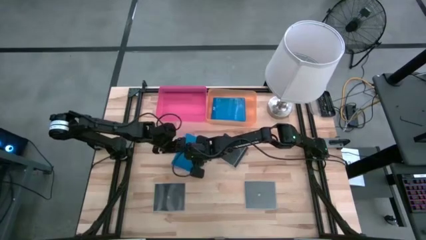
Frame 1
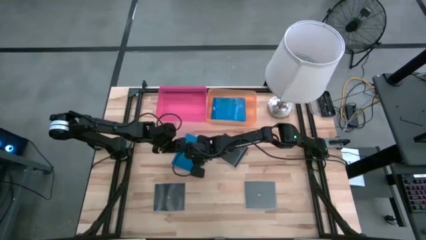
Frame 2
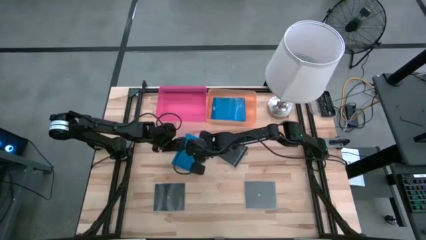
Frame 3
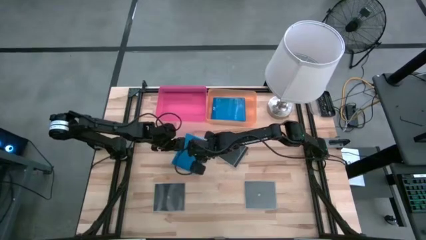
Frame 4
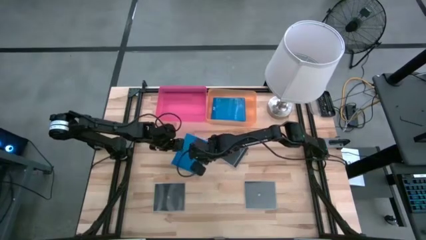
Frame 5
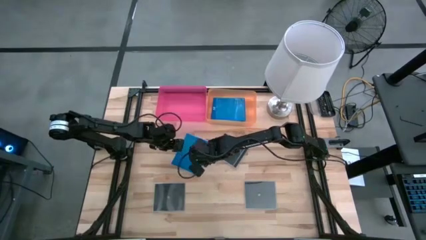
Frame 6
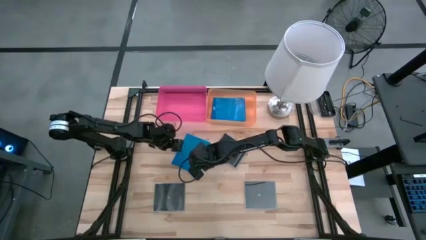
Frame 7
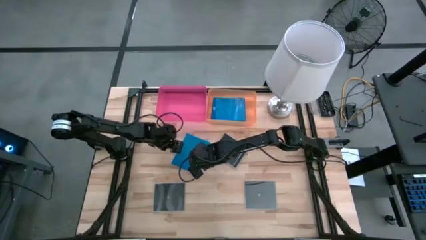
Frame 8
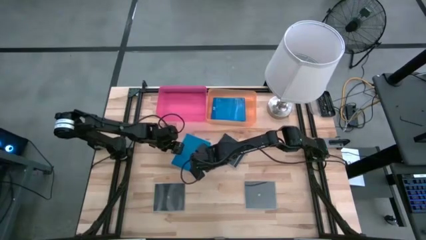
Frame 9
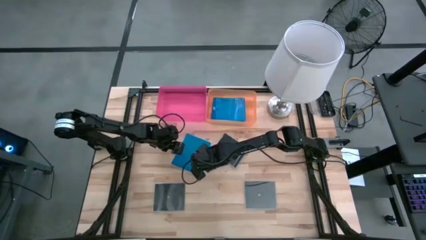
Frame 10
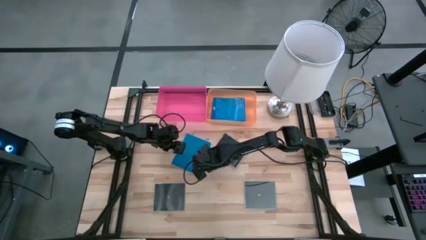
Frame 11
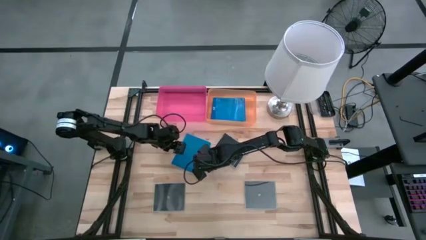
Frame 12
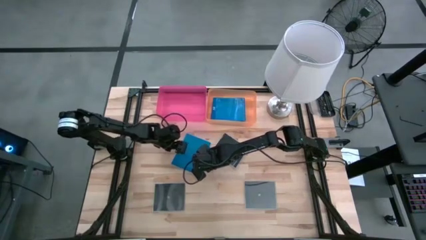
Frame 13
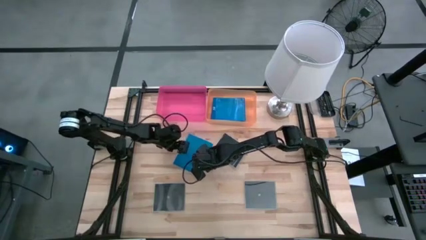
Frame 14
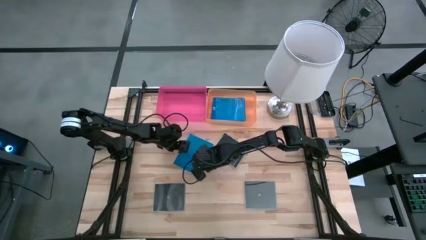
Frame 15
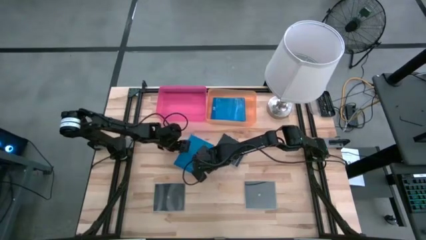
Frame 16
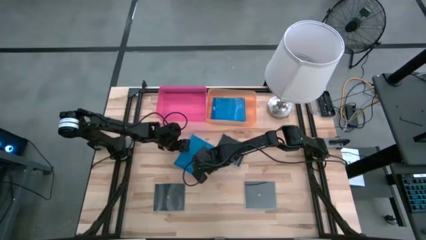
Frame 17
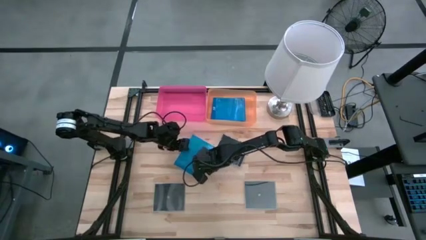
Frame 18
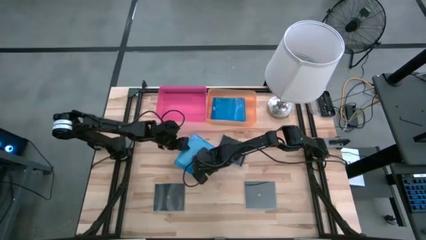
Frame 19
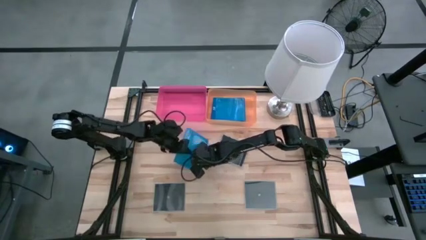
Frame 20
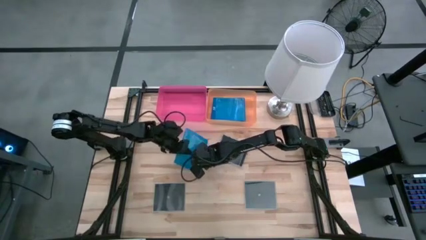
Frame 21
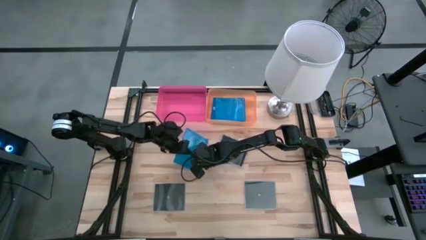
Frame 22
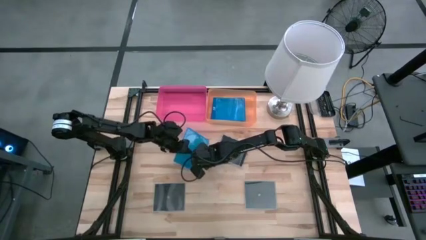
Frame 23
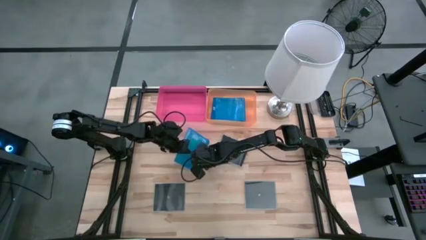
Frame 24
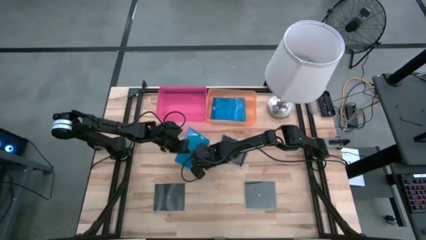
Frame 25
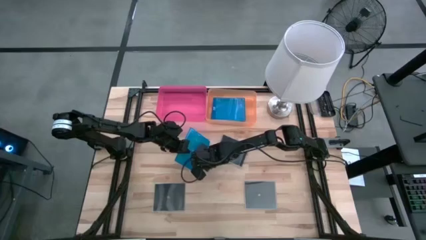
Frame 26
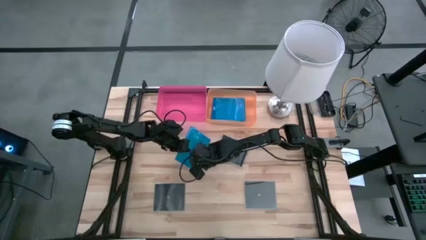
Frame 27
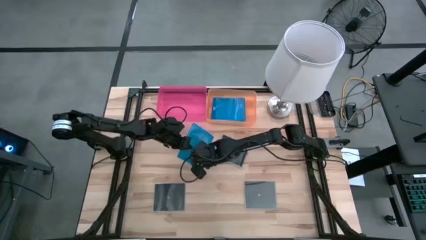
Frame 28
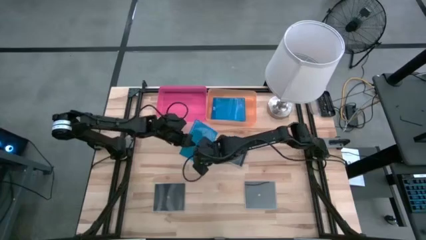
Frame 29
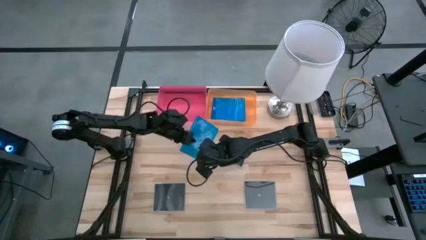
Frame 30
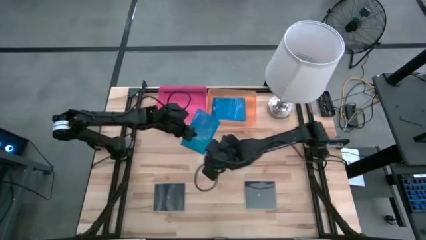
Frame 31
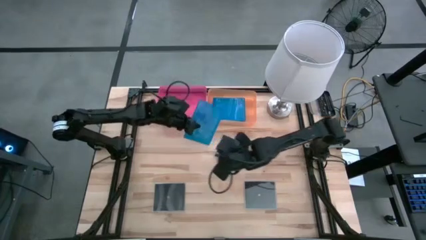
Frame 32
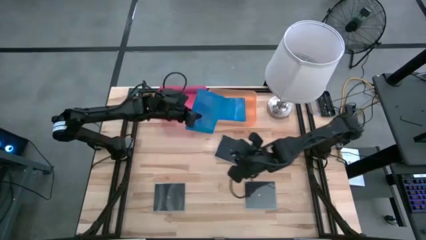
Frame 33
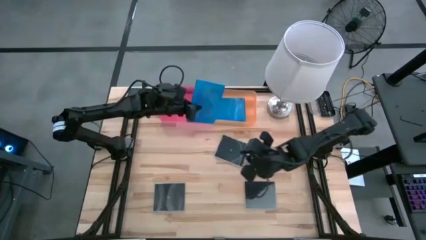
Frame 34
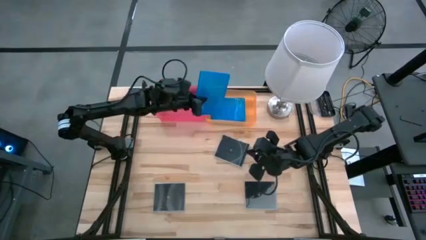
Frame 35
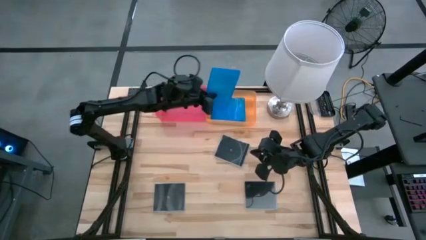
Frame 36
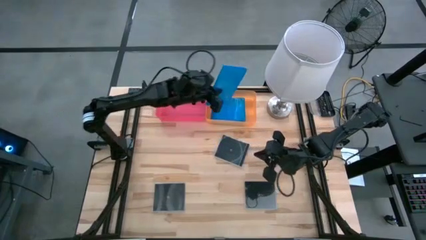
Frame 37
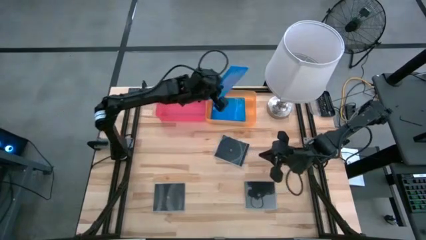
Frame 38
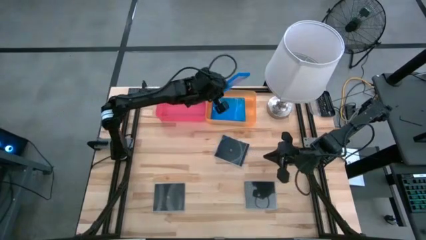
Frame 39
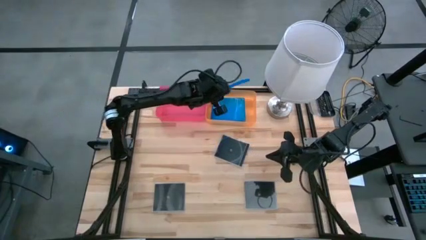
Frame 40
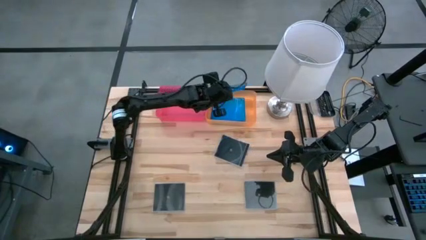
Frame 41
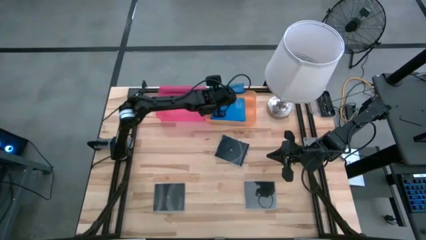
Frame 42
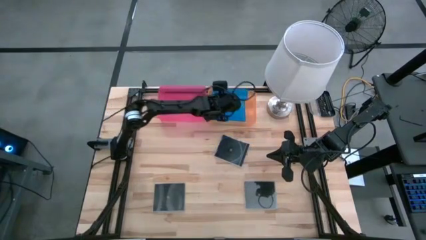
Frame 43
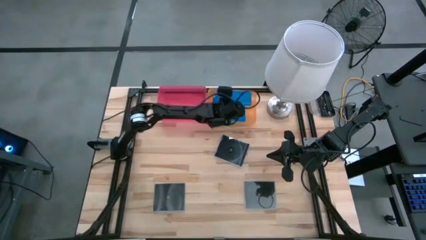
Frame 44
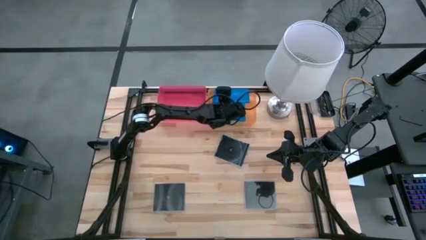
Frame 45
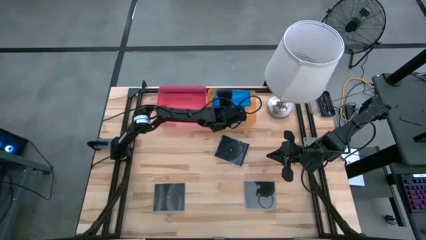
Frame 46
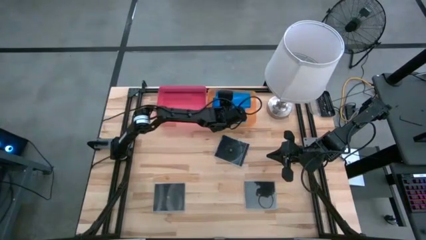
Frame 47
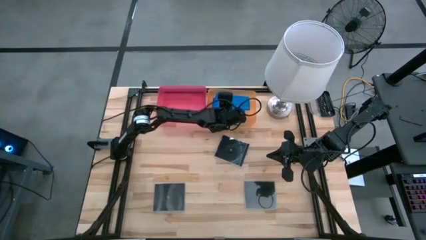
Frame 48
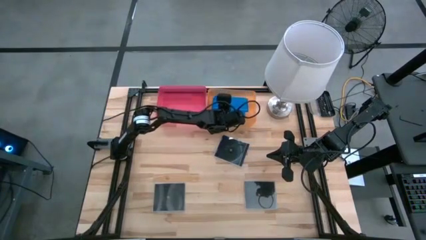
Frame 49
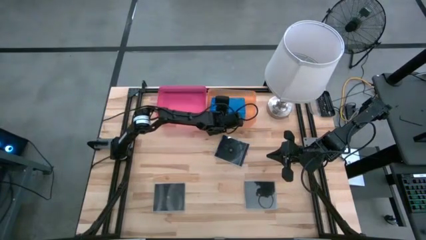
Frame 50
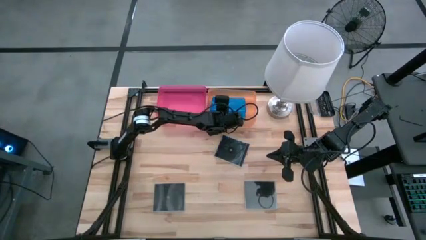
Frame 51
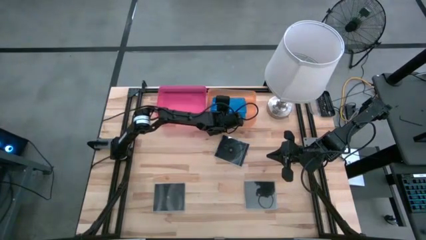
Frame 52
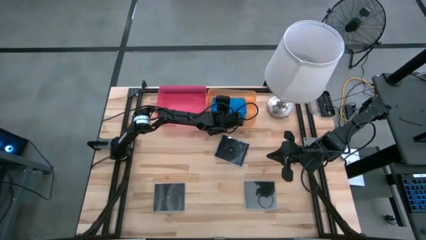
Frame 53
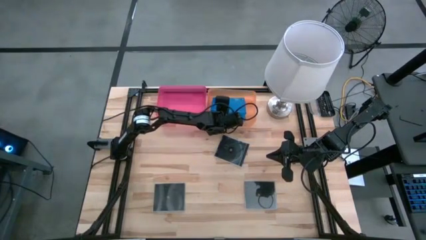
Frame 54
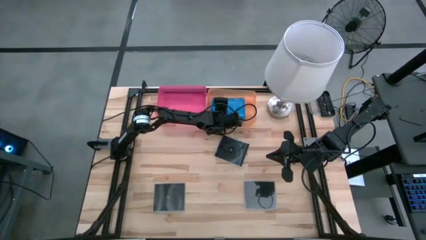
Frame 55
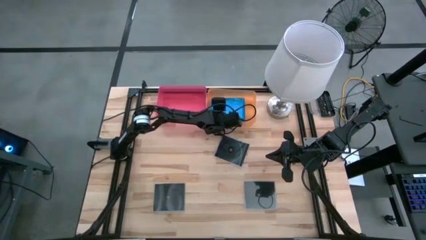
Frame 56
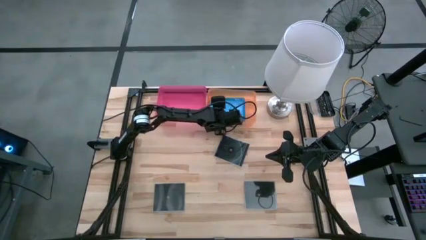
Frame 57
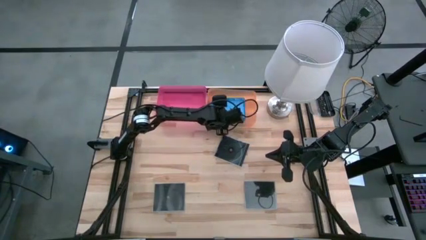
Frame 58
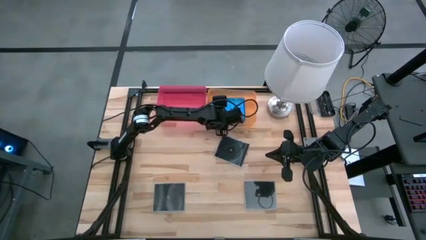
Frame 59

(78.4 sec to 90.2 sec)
Task: Pick & place jewel cases by type
Put the blue CD case into the orange bin
